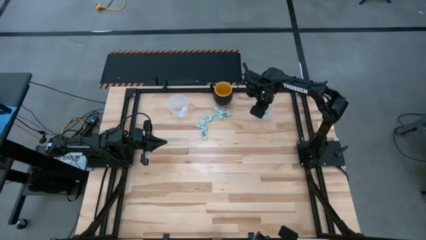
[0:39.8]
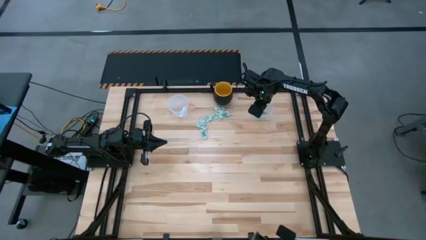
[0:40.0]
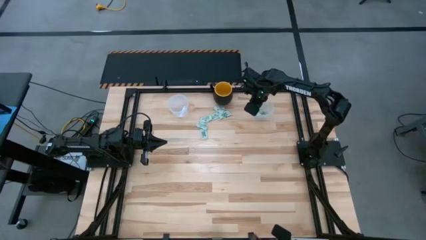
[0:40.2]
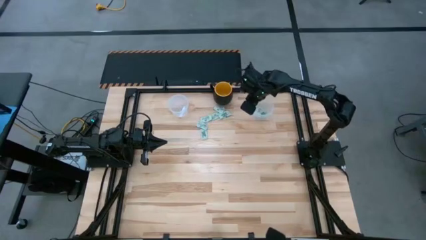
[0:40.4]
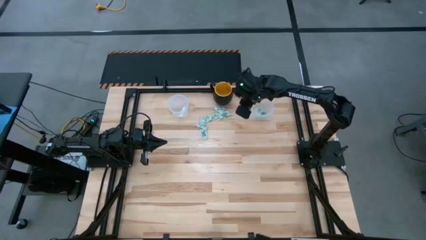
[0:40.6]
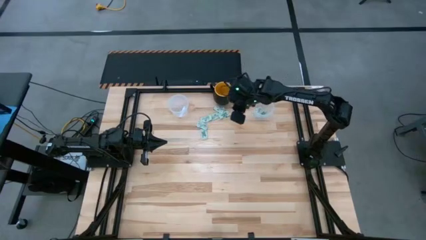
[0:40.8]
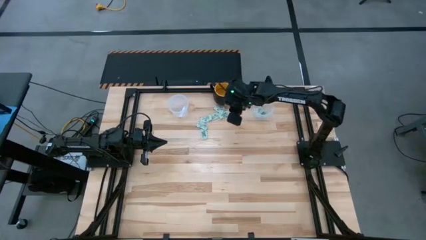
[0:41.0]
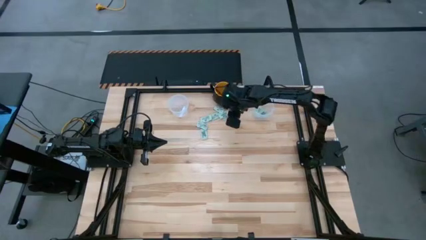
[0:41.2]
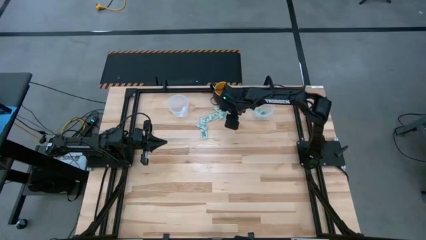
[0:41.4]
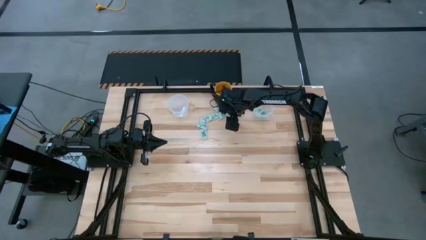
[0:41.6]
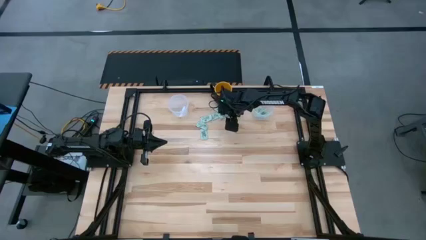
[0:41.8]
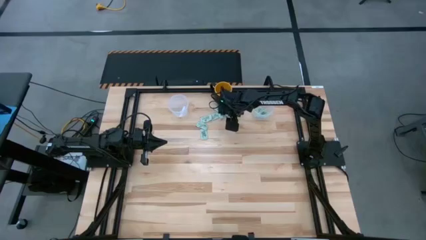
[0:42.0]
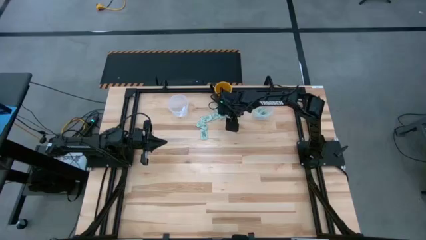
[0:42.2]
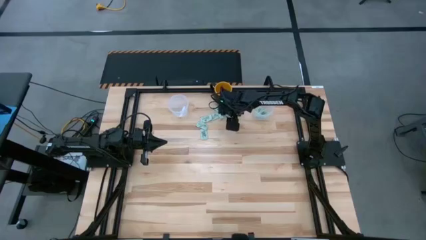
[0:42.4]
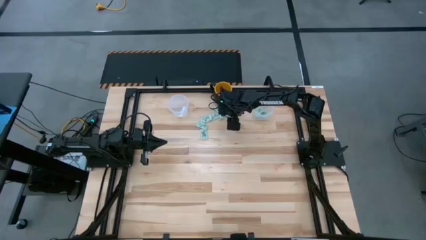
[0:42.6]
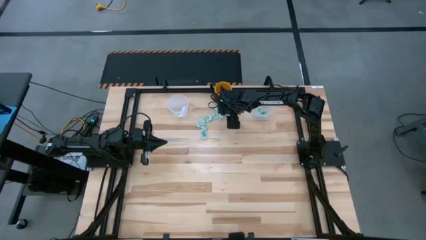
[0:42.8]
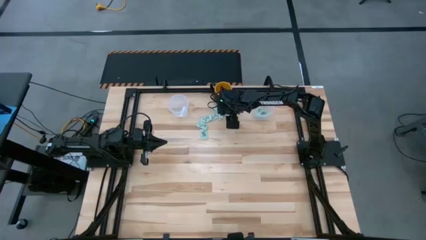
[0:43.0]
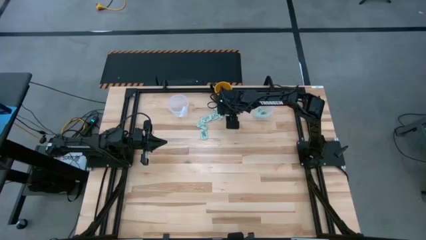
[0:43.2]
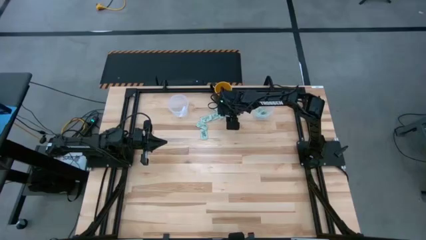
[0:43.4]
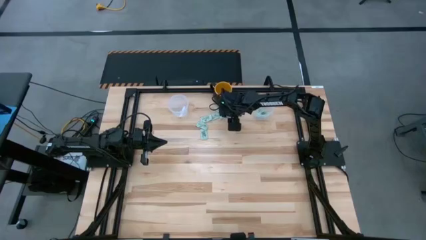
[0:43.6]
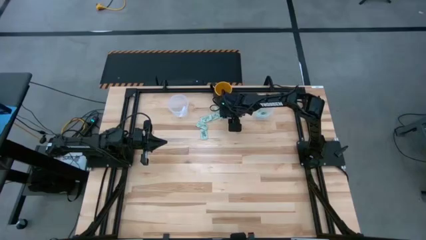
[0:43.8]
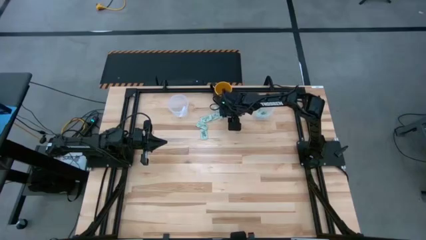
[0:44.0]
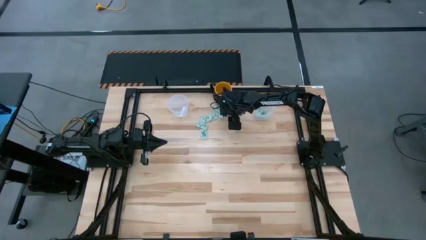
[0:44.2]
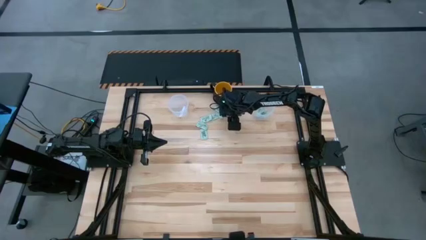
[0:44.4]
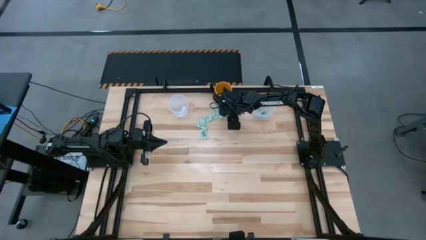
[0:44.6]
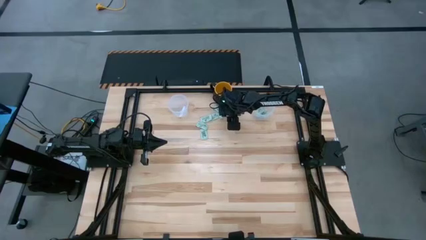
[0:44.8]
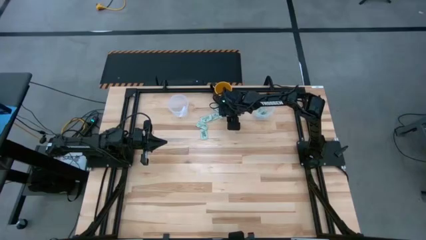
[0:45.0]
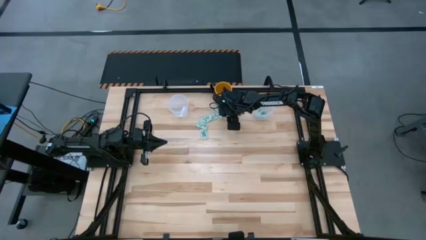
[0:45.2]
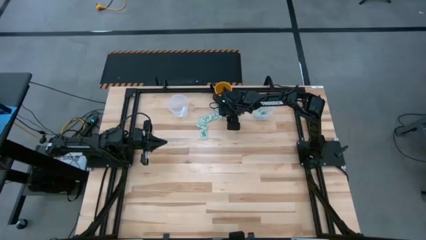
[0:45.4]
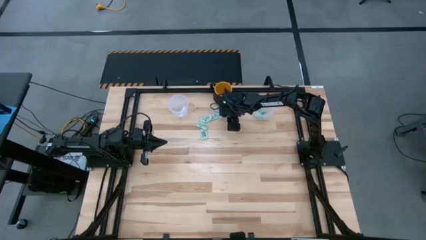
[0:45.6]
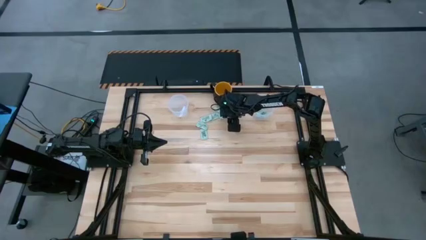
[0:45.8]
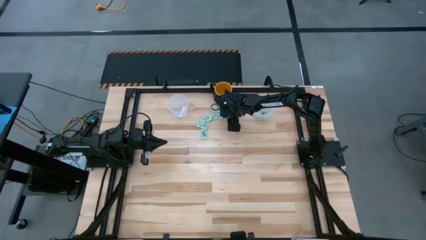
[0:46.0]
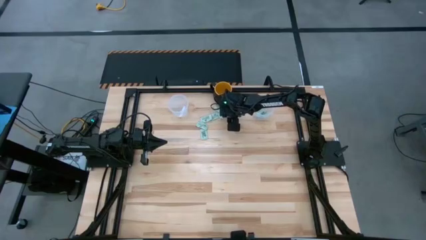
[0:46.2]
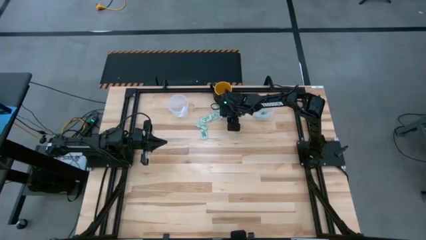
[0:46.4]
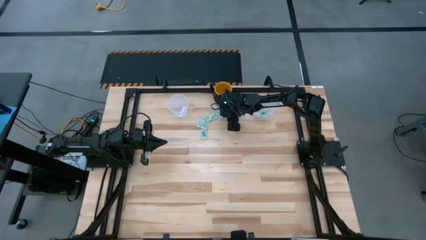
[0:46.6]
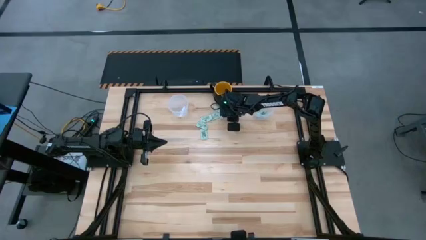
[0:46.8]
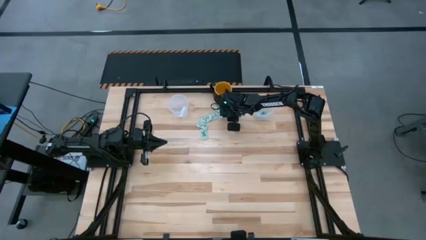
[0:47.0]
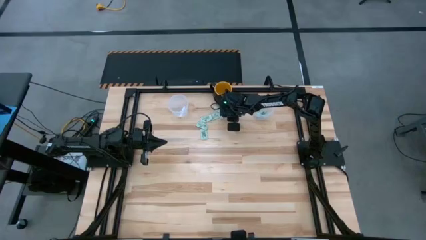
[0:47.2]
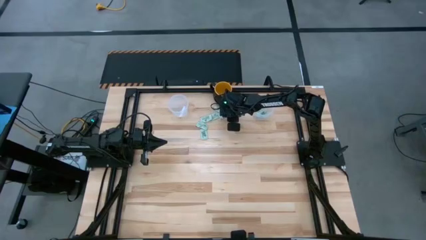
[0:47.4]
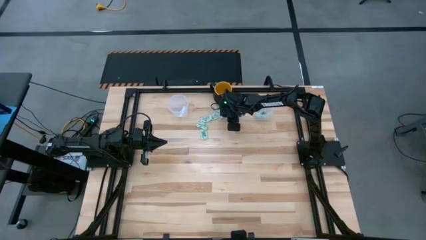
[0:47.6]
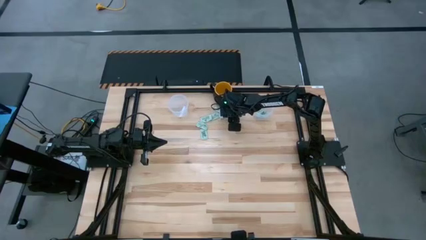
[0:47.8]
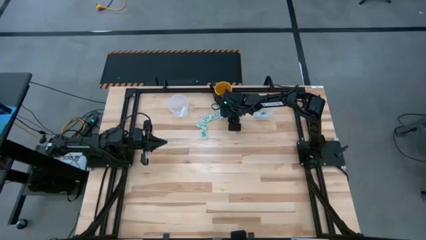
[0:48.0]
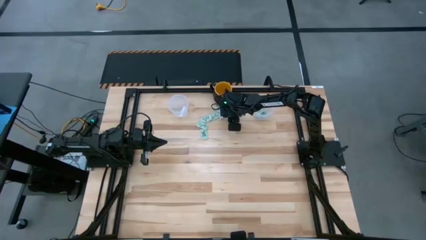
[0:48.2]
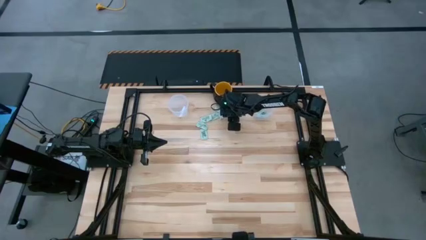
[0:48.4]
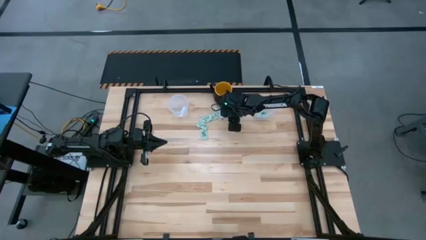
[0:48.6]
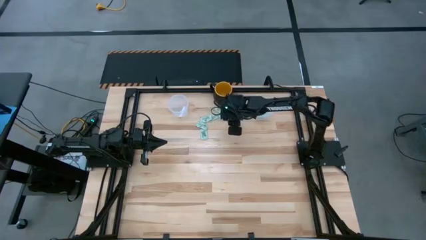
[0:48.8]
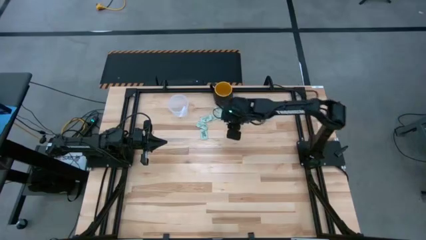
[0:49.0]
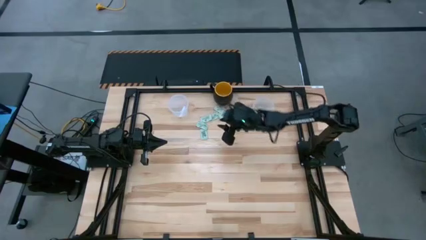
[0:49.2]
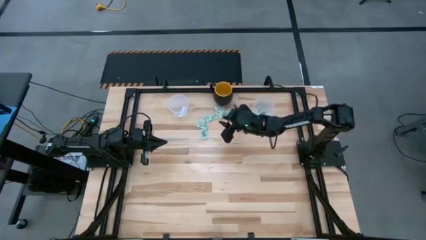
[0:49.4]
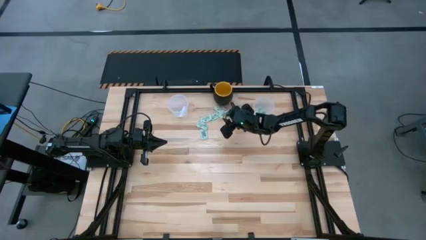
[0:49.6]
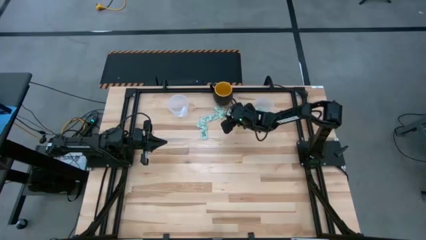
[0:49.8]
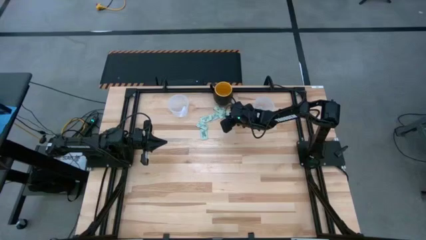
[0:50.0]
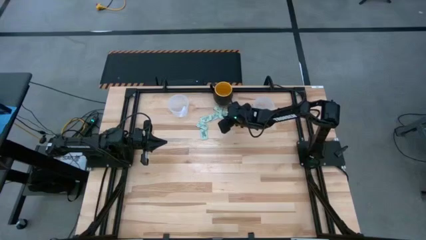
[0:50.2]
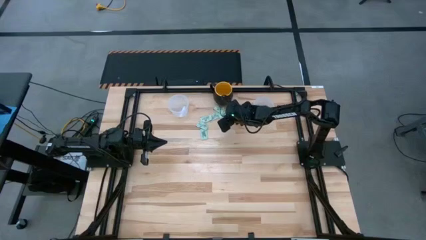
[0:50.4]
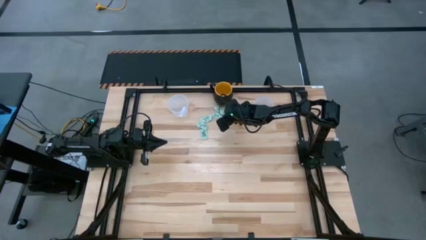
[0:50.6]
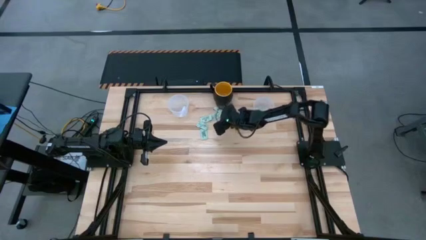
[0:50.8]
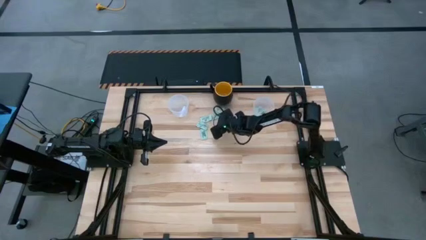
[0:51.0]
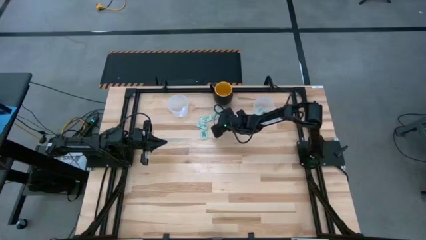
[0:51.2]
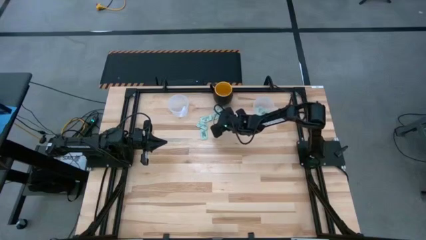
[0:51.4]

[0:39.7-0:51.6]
Task: Pick and place Stevia / Truvia into bins
Put the stevia packet into the right transparent container
